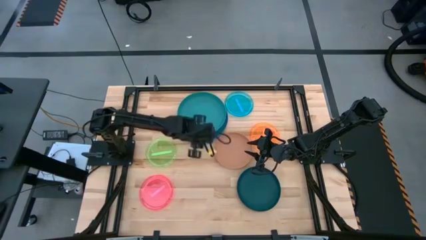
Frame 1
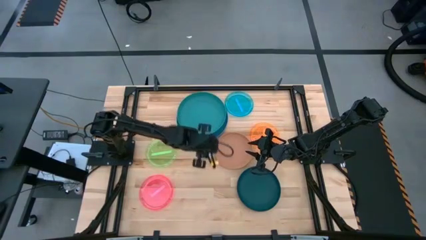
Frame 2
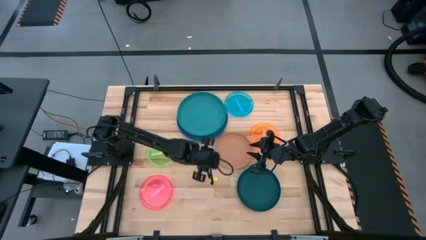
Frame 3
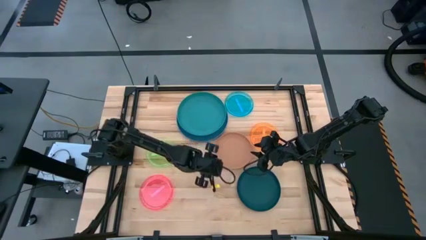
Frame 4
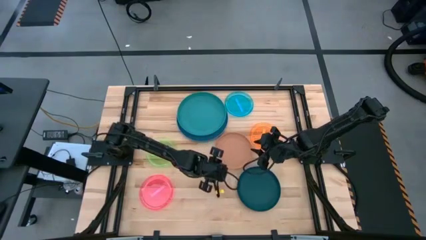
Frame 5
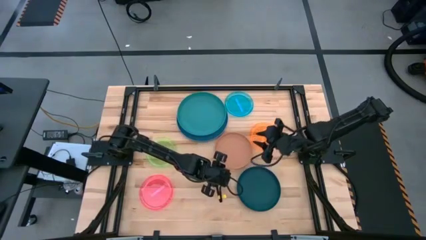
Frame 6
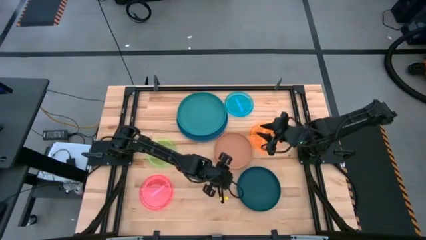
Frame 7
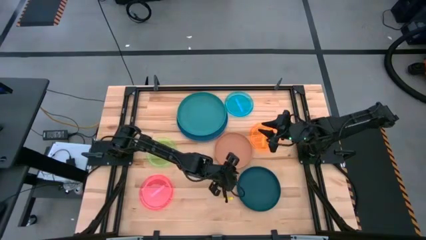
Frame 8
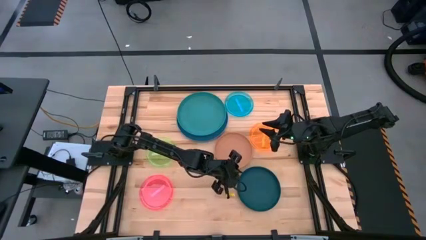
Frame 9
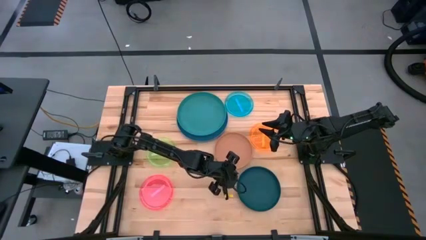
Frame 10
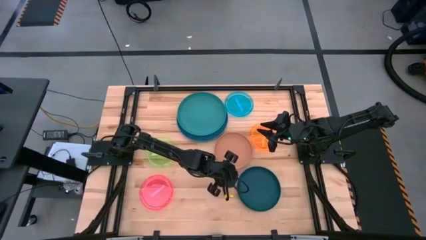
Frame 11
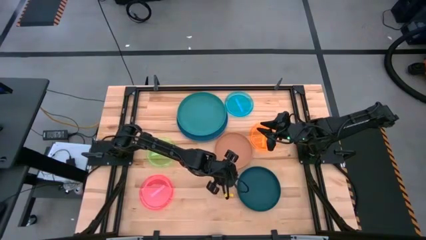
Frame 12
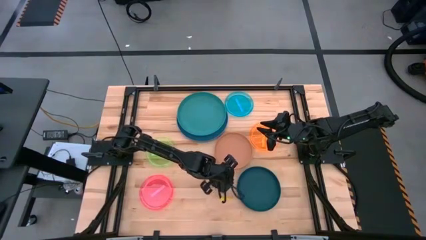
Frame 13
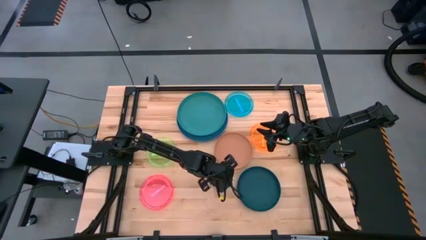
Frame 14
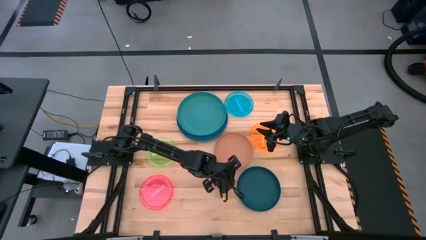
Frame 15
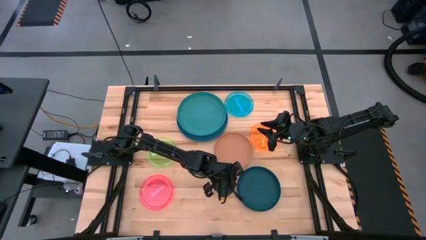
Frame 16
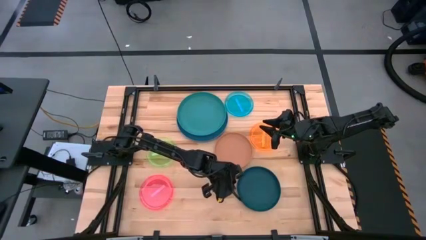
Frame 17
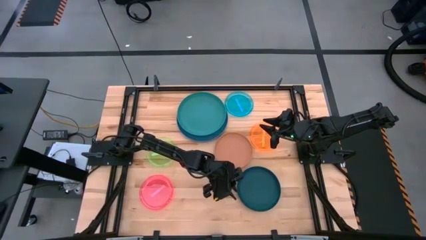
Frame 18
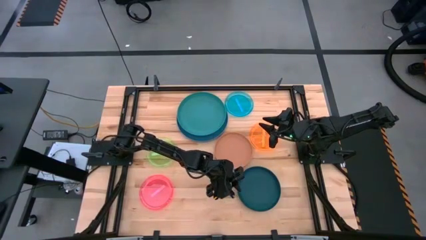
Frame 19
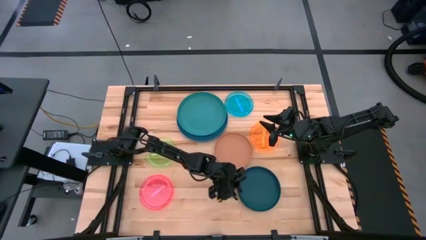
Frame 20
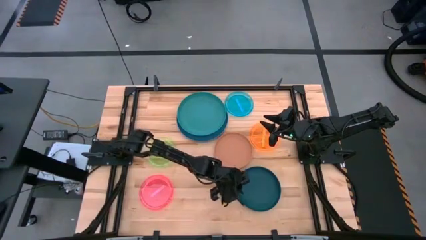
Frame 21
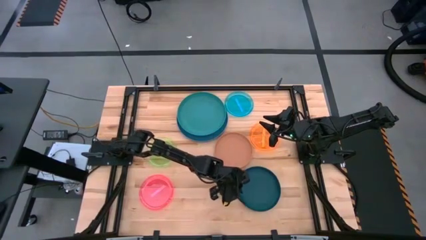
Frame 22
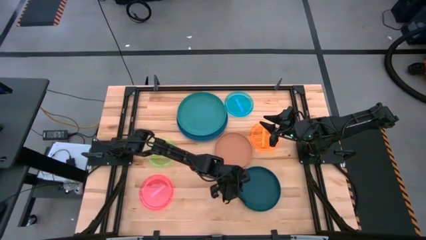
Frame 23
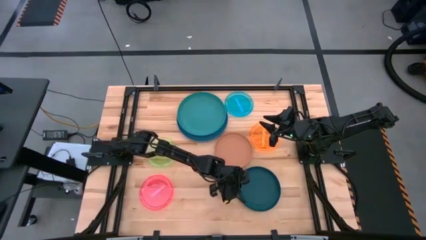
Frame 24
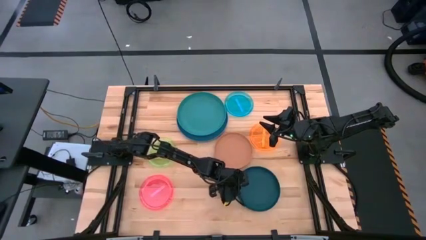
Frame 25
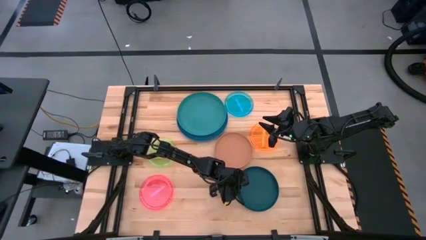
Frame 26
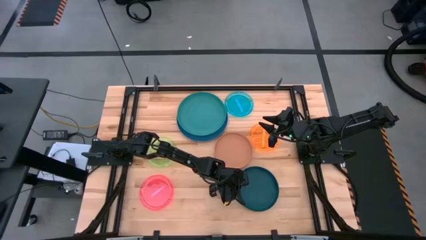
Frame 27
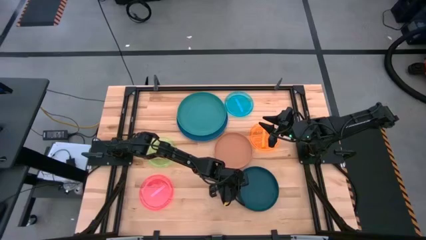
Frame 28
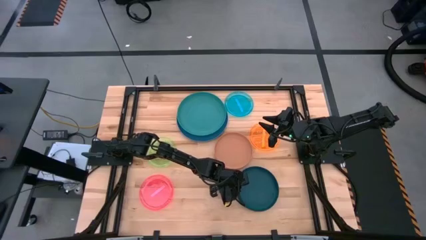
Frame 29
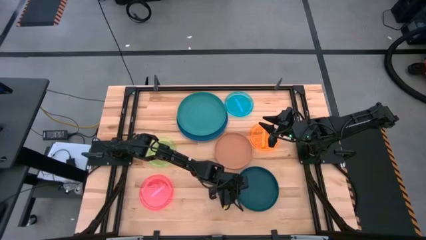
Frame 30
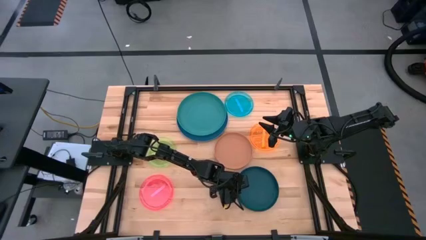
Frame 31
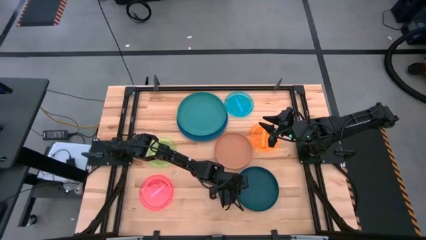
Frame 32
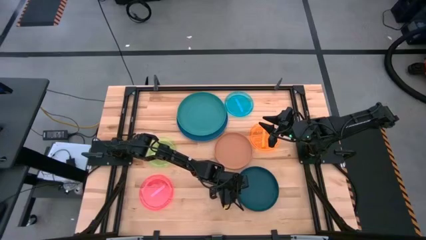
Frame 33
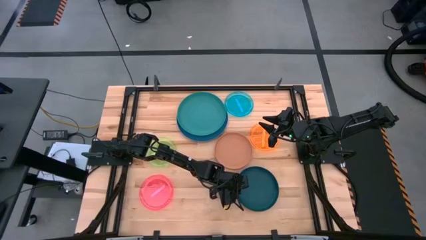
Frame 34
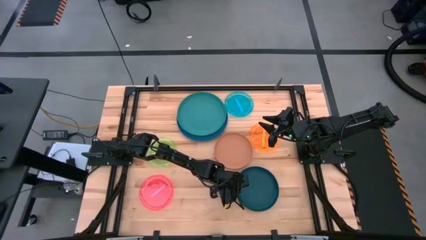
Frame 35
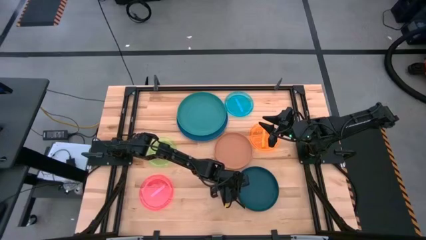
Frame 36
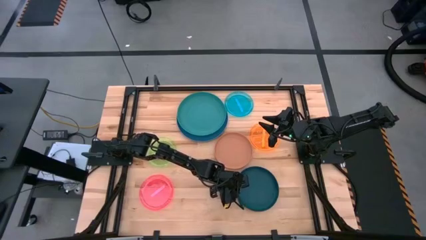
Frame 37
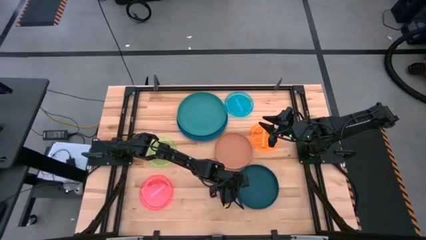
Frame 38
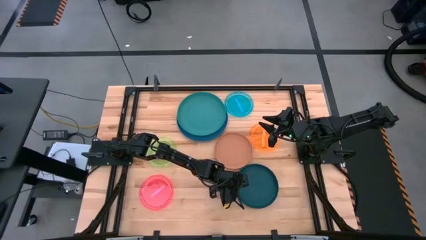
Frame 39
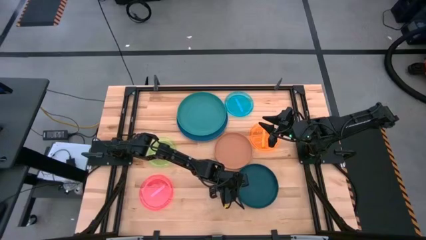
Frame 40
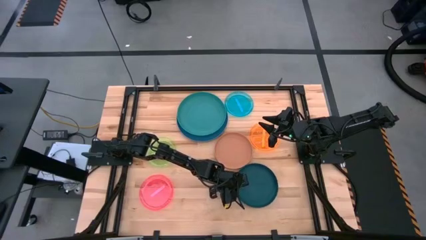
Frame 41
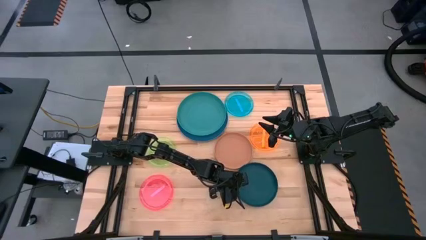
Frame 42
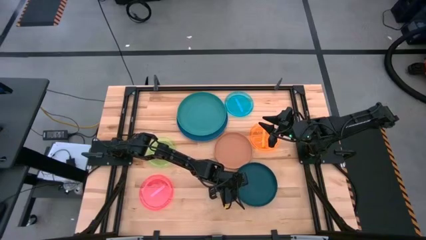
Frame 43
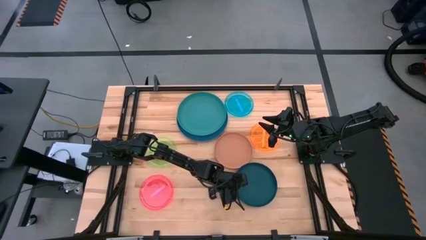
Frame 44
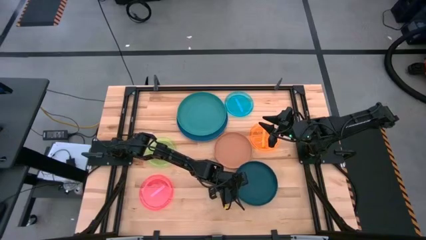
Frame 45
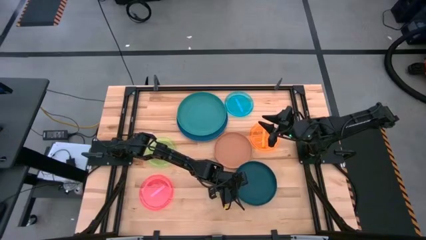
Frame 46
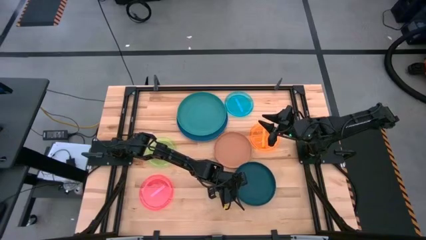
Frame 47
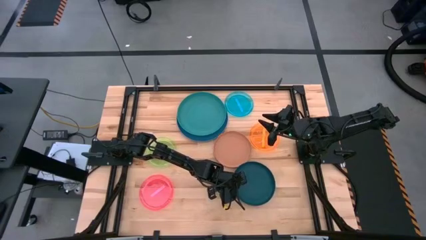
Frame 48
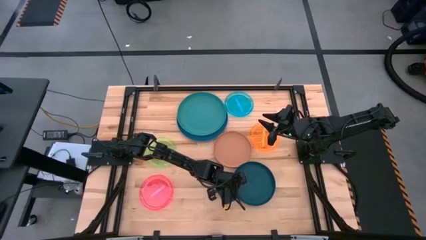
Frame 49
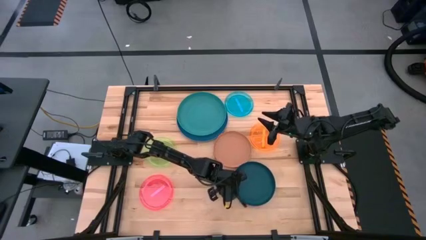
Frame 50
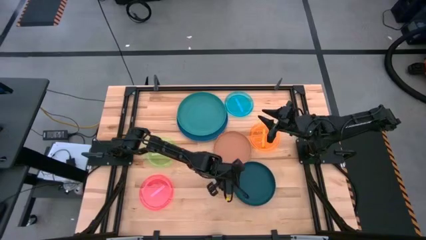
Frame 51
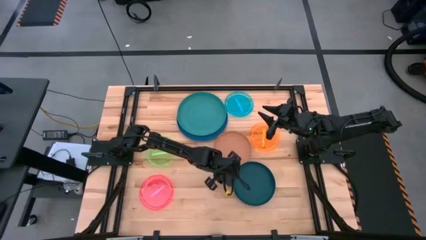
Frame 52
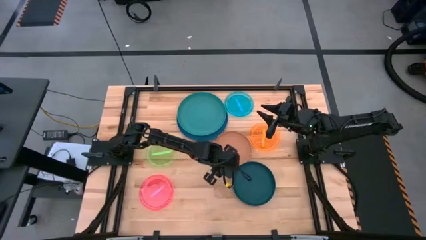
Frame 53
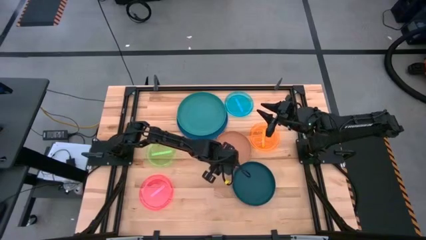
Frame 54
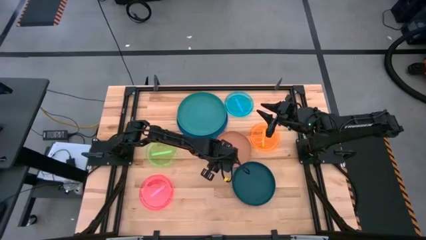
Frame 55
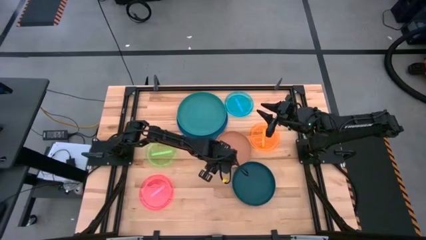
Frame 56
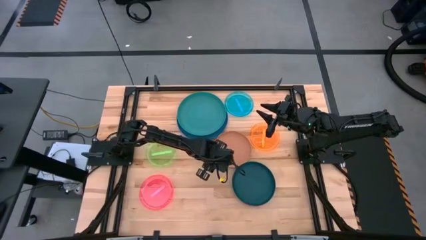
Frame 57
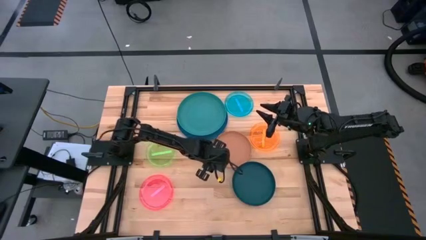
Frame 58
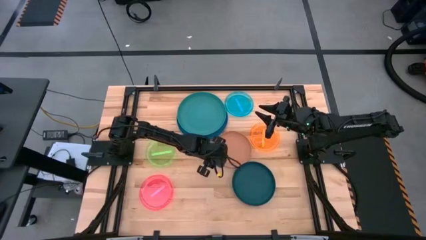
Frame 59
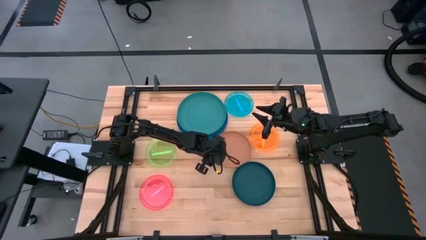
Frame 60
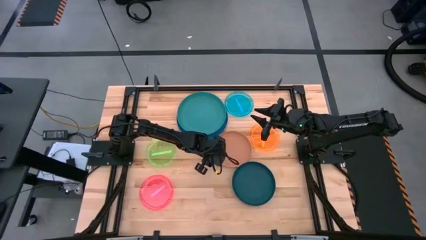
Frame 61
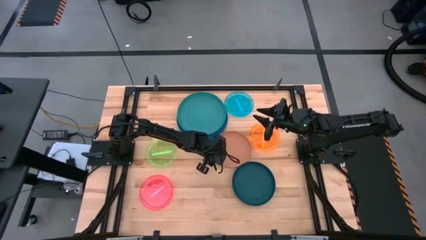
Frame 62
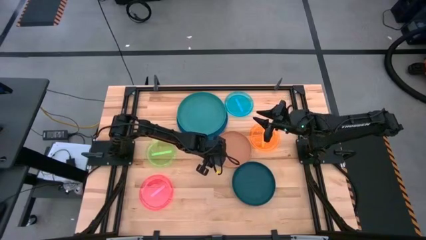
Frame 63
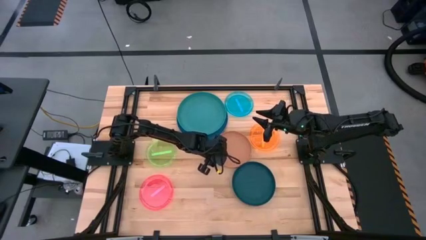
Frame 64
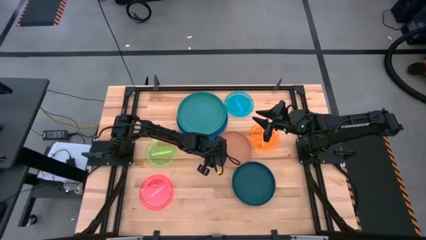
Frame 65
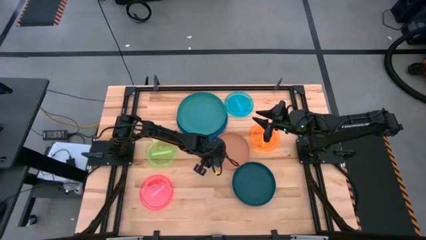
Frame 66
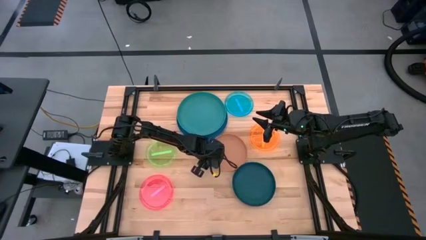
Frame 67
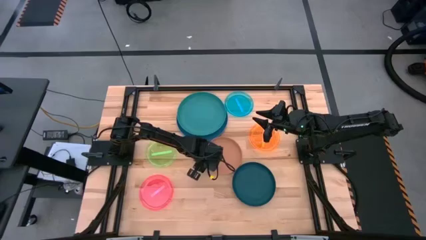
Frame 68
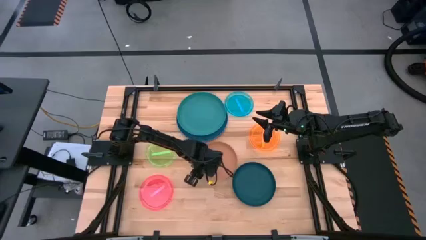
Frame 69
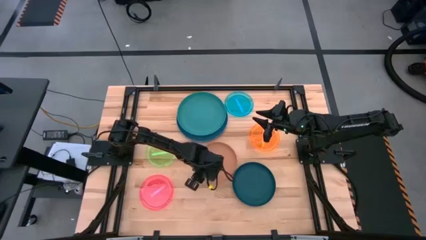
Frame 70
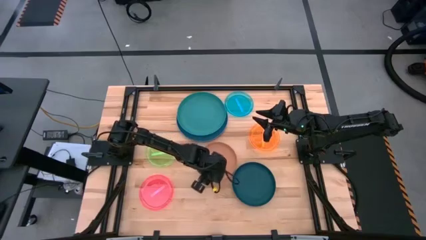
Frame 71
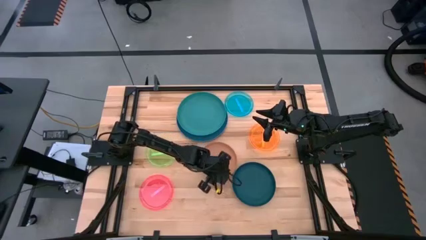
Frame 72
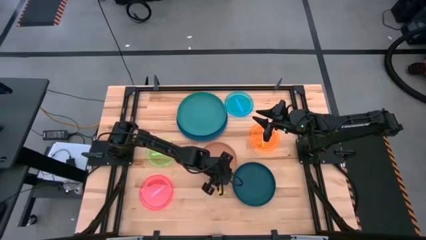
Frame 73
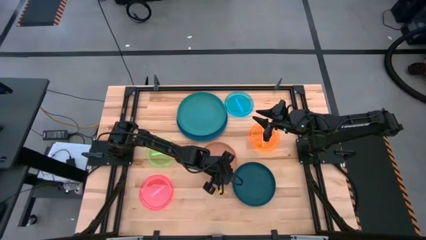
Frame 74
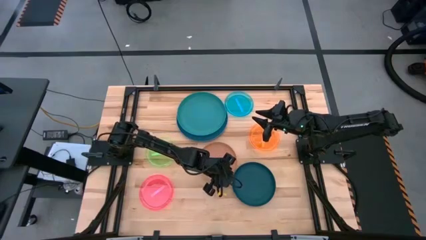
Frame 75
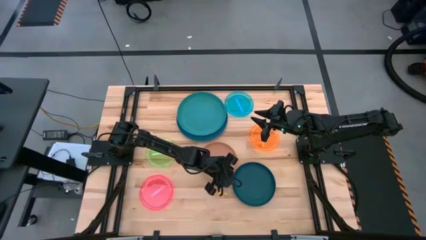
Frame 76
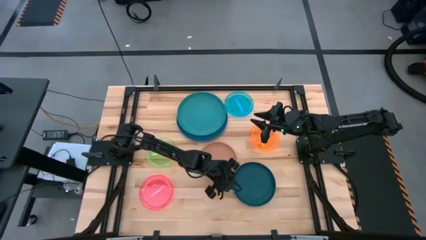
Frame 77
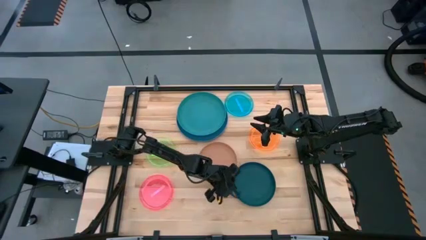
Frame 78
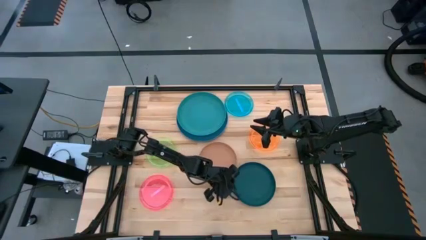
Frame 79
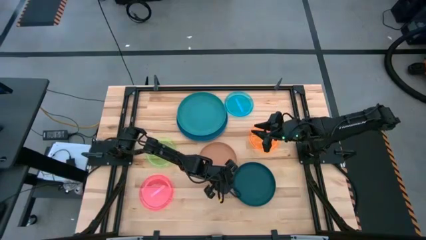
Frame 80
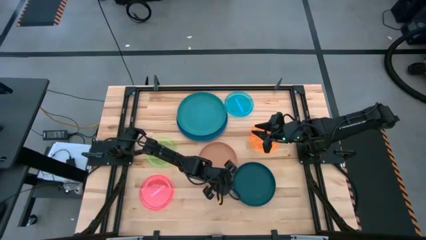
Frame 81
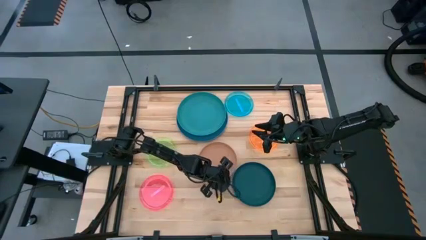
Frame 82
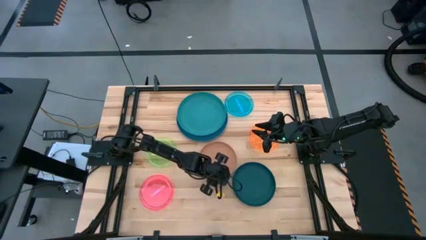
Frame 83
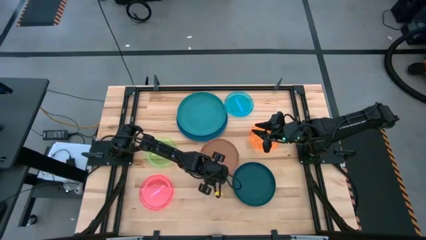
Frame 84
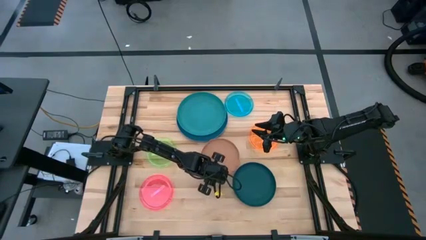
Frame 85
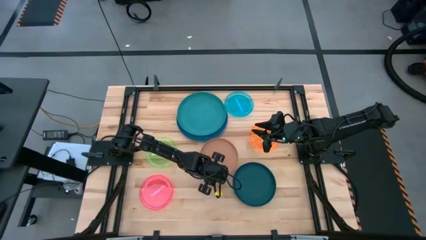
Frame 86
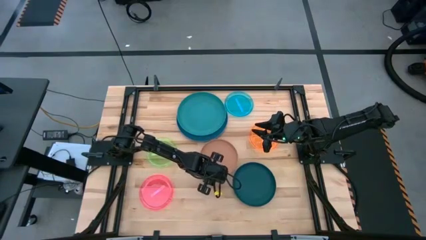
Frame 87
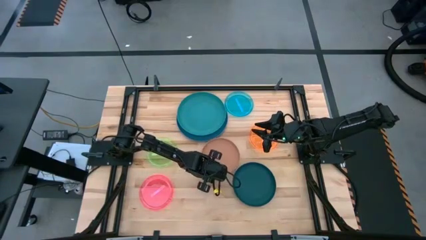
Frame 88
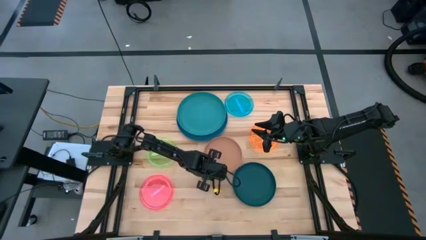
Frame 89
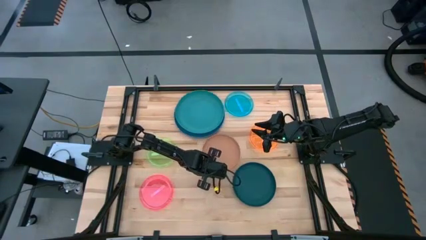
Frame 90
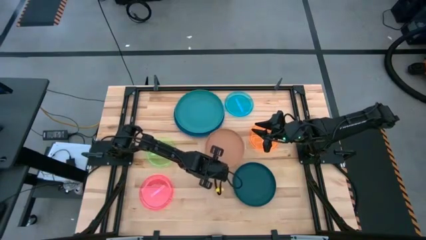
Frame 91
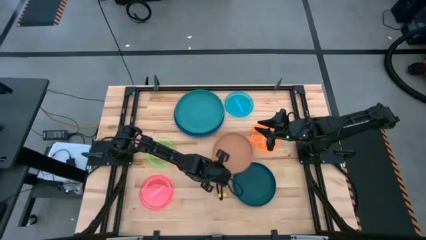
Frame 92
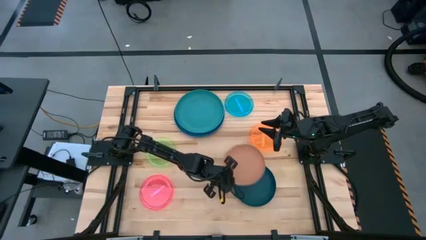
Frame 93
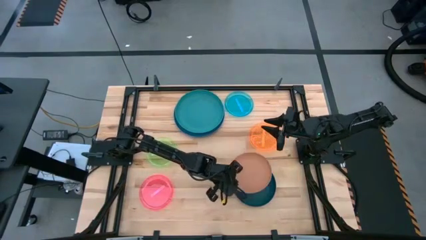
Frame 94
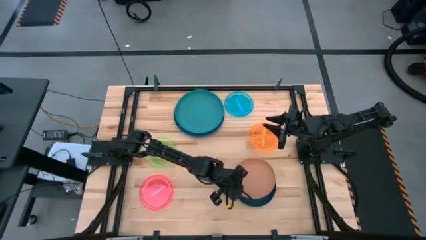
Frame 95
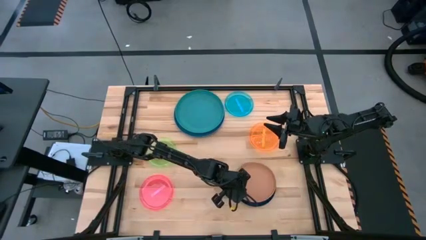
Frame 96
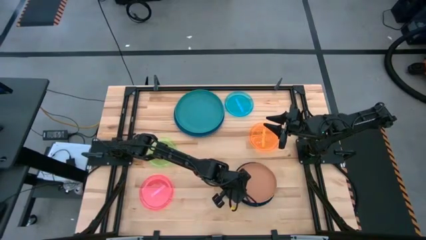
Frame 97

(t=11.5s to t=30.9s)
Task: Stack plastic plates
Stack the brown plate on top of the dark green plate
